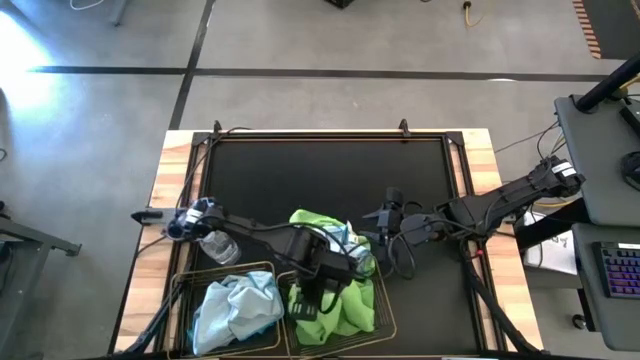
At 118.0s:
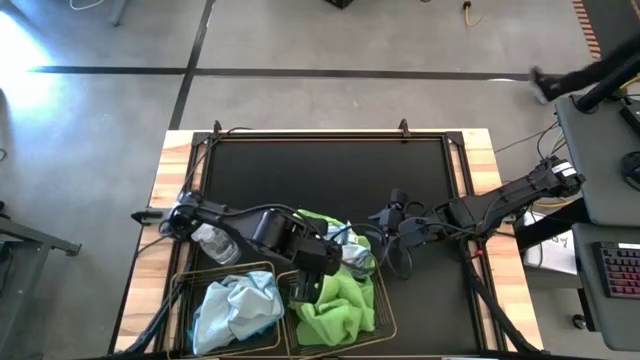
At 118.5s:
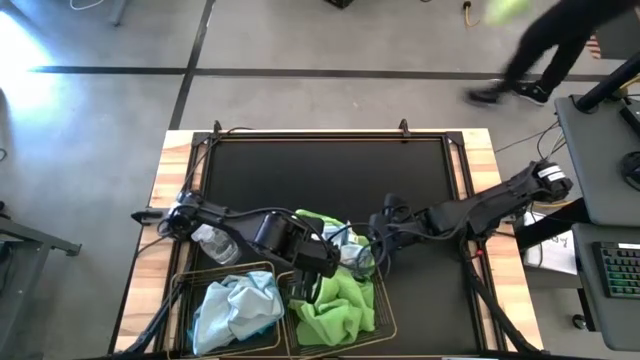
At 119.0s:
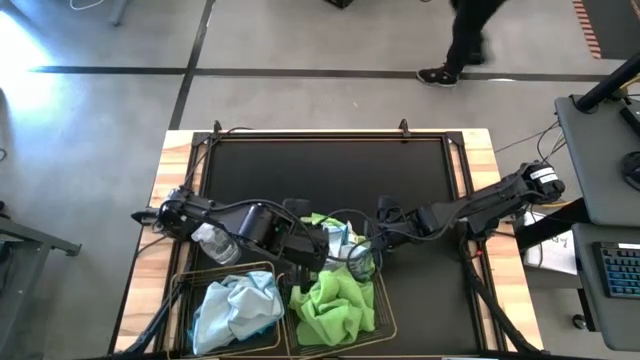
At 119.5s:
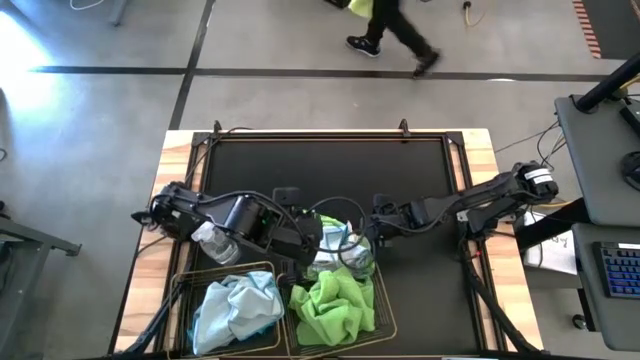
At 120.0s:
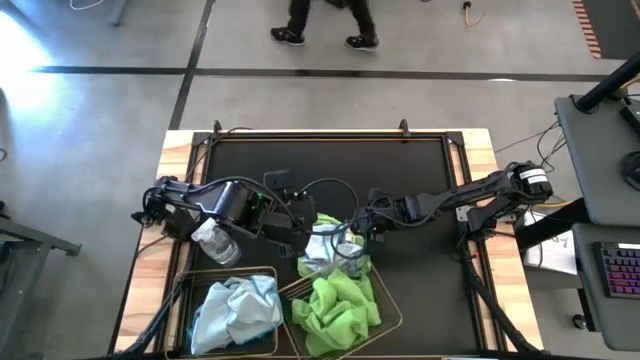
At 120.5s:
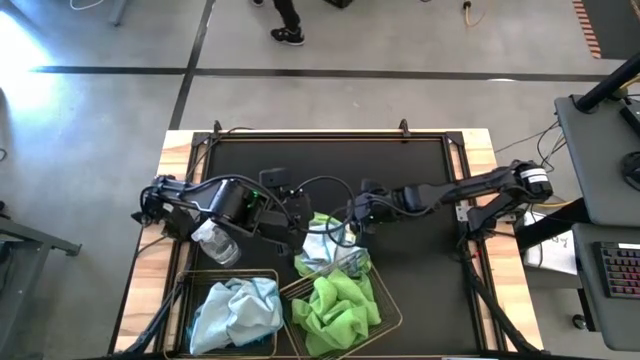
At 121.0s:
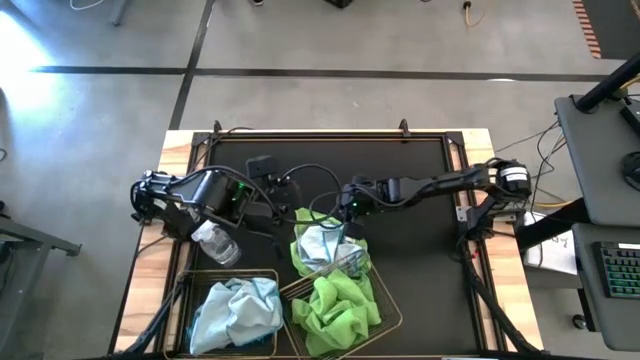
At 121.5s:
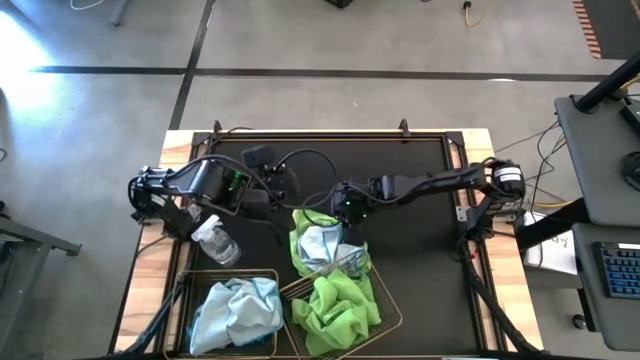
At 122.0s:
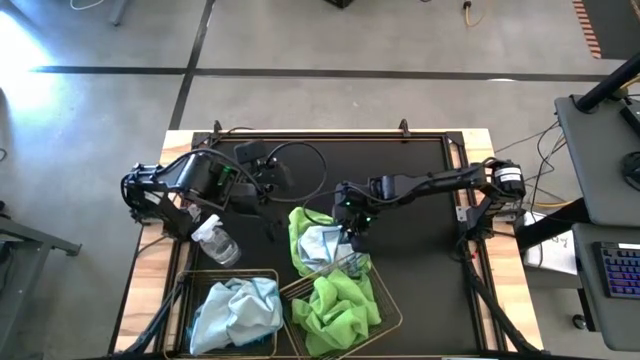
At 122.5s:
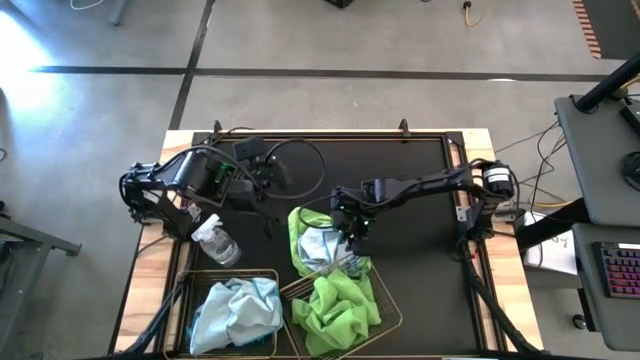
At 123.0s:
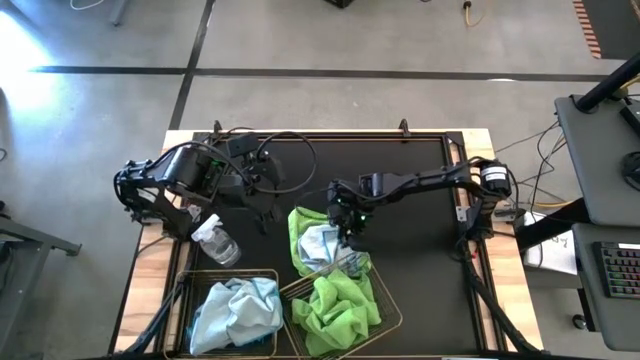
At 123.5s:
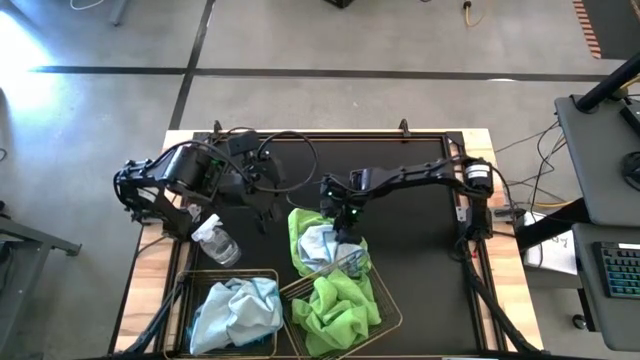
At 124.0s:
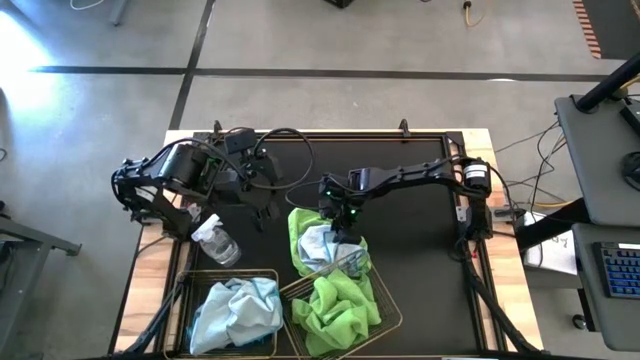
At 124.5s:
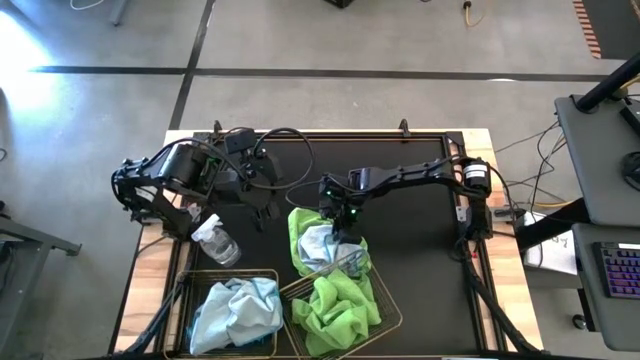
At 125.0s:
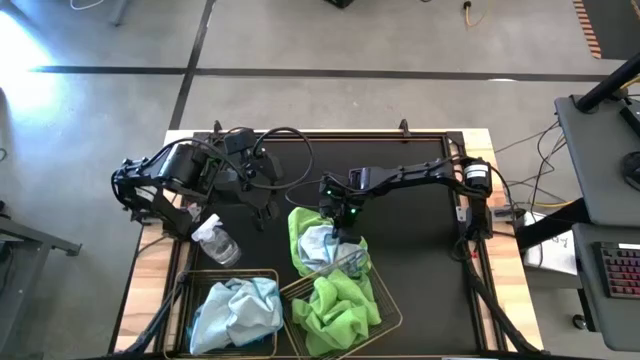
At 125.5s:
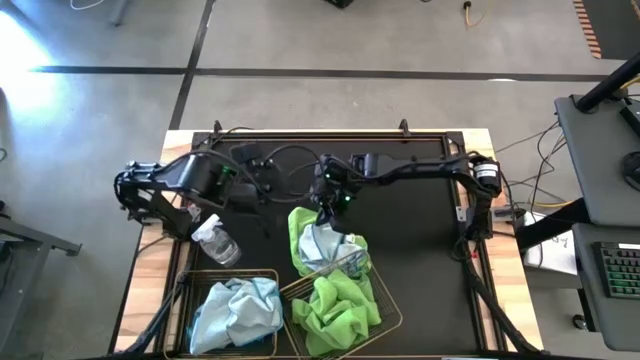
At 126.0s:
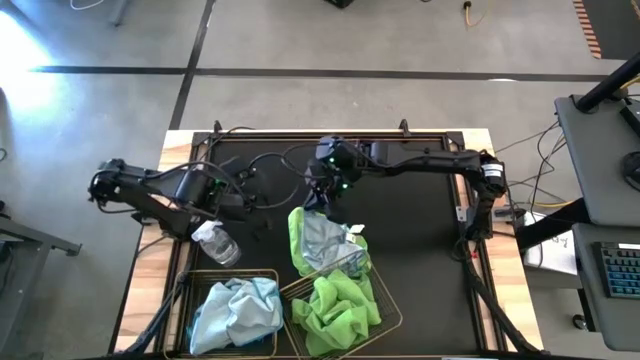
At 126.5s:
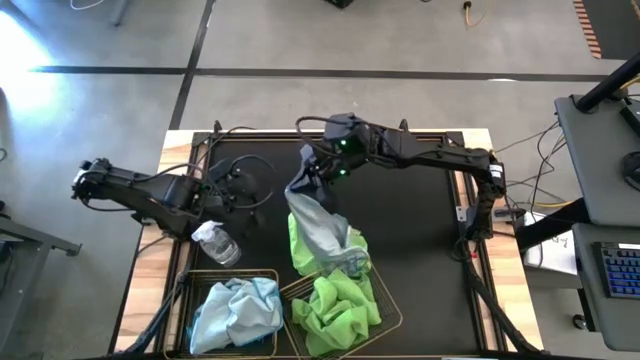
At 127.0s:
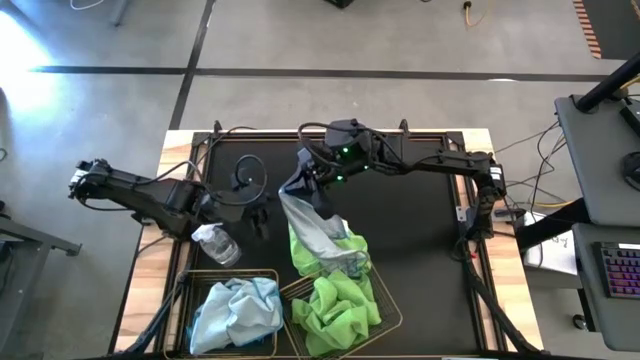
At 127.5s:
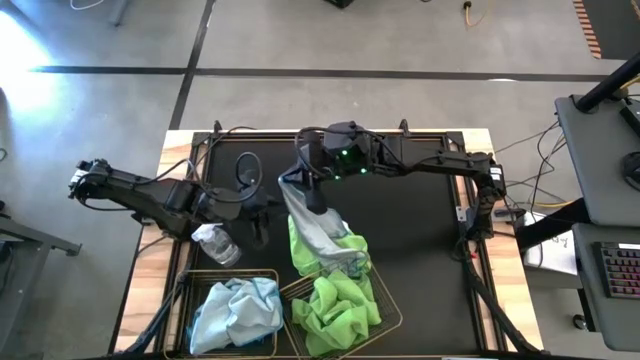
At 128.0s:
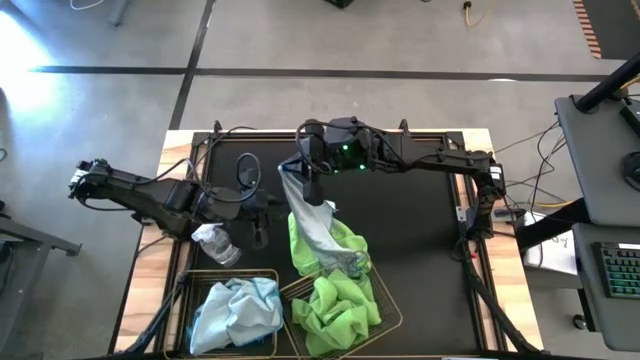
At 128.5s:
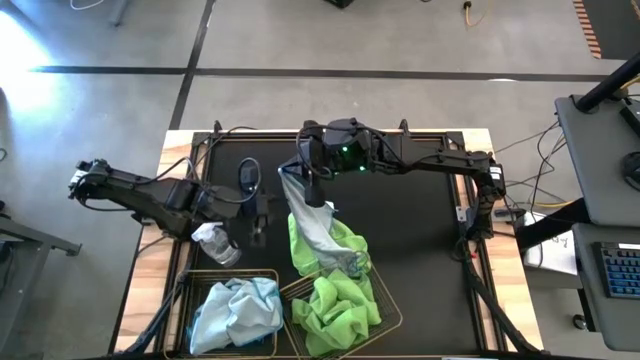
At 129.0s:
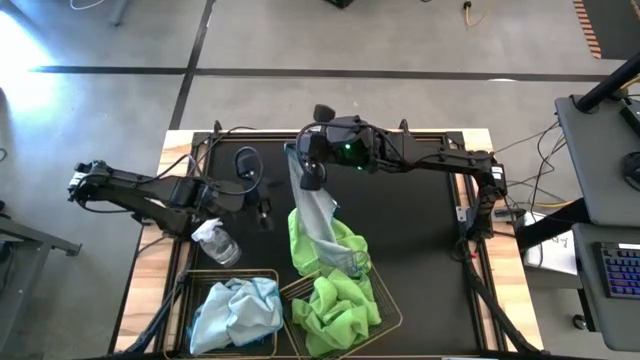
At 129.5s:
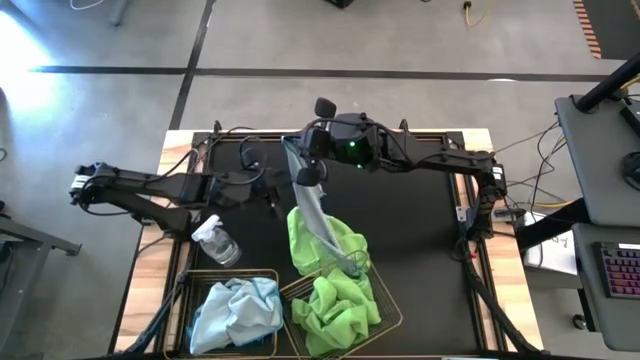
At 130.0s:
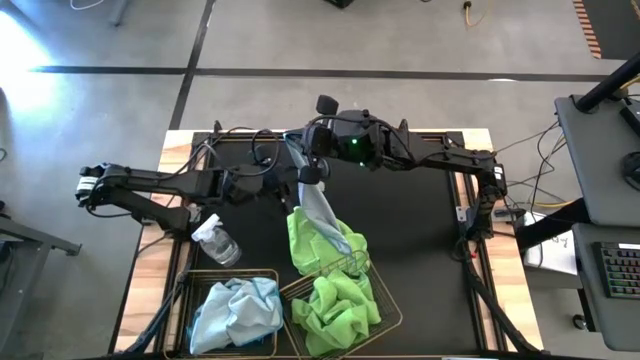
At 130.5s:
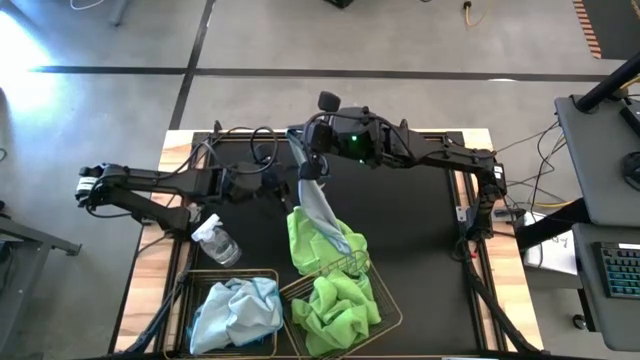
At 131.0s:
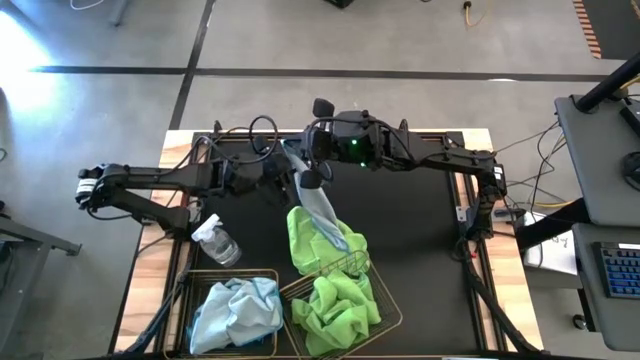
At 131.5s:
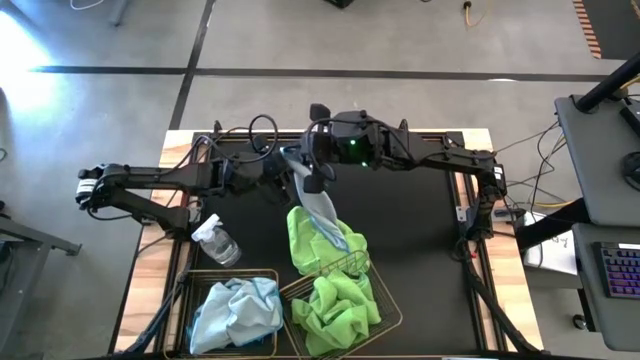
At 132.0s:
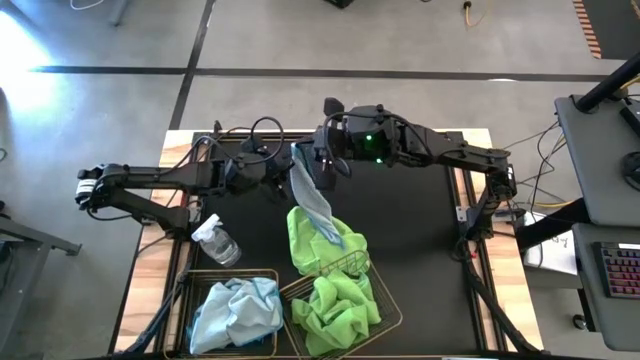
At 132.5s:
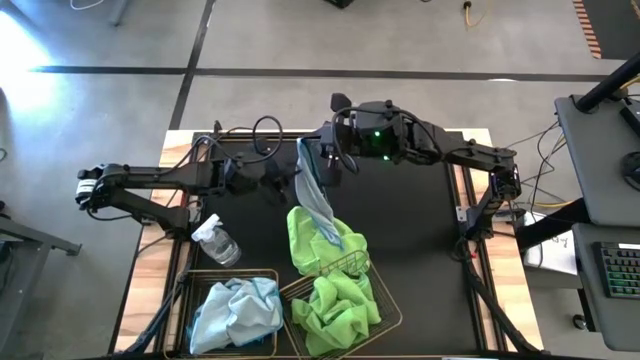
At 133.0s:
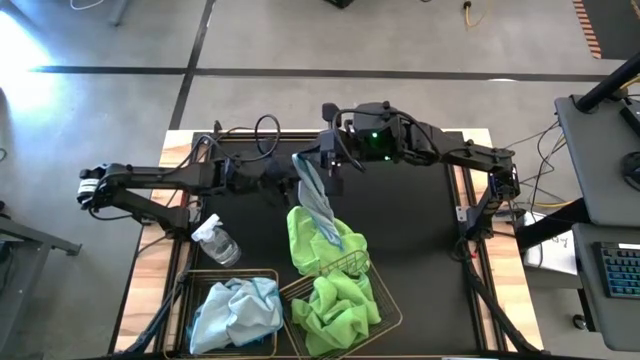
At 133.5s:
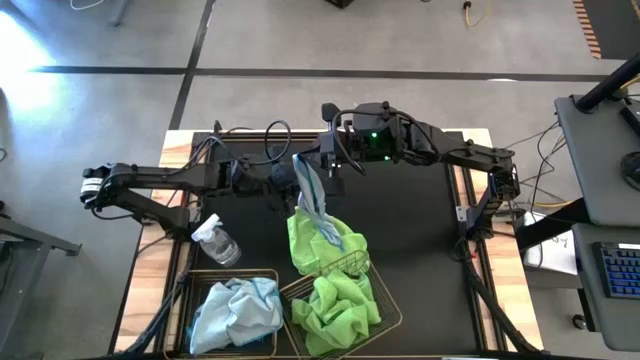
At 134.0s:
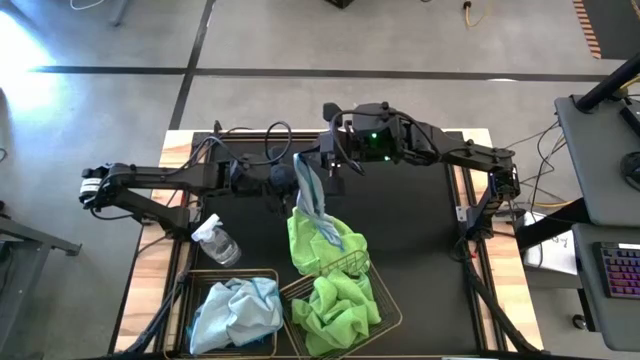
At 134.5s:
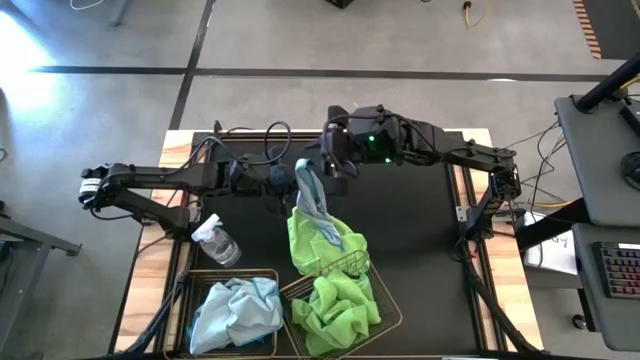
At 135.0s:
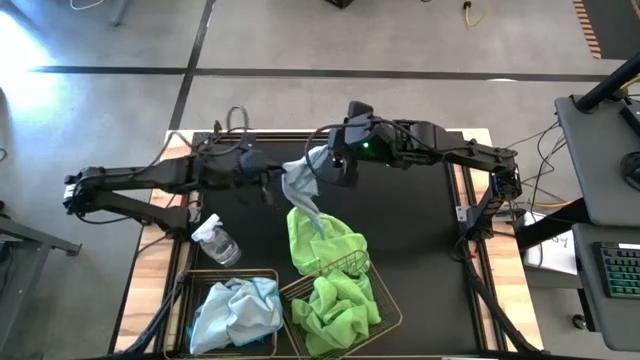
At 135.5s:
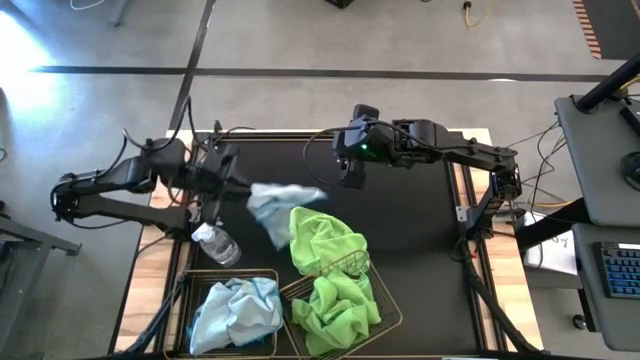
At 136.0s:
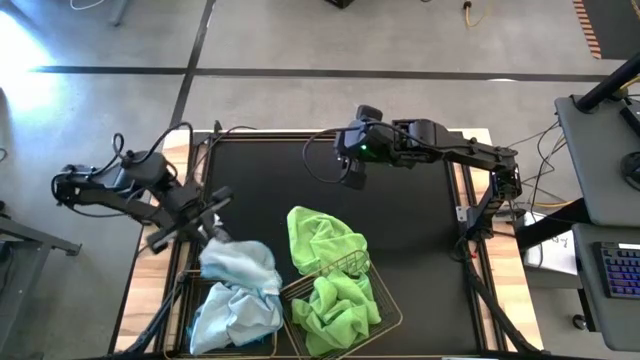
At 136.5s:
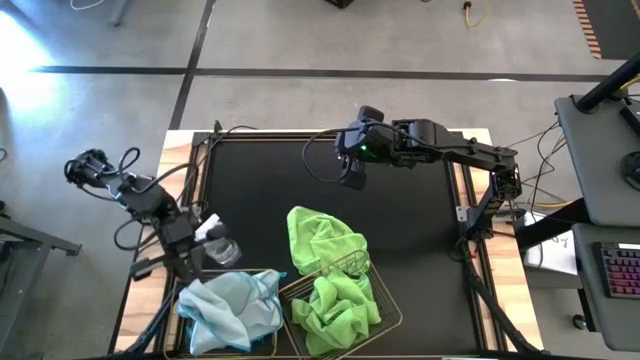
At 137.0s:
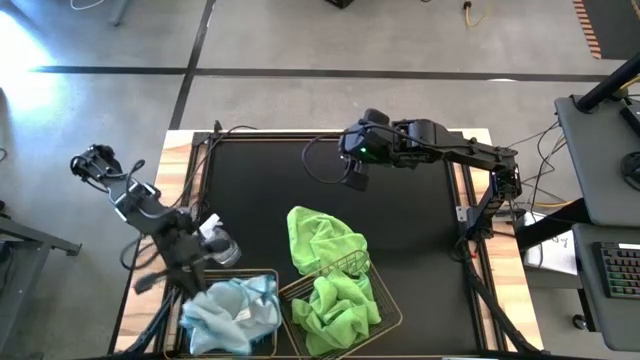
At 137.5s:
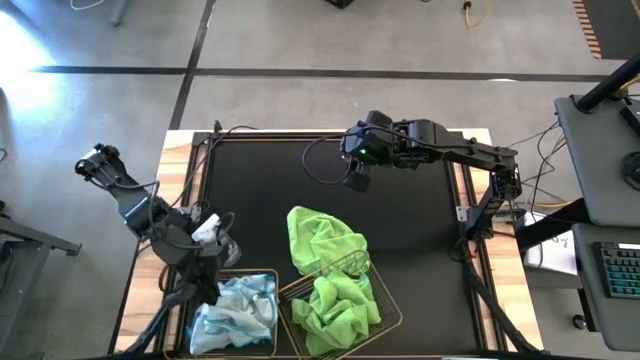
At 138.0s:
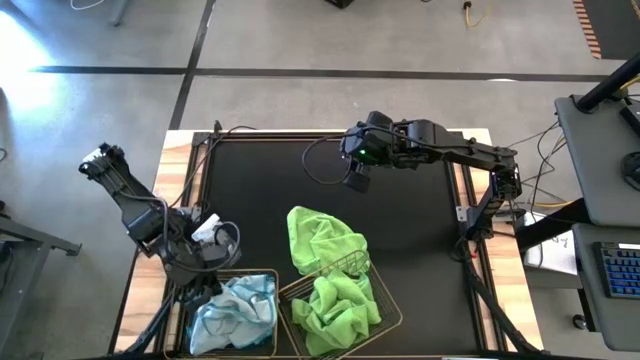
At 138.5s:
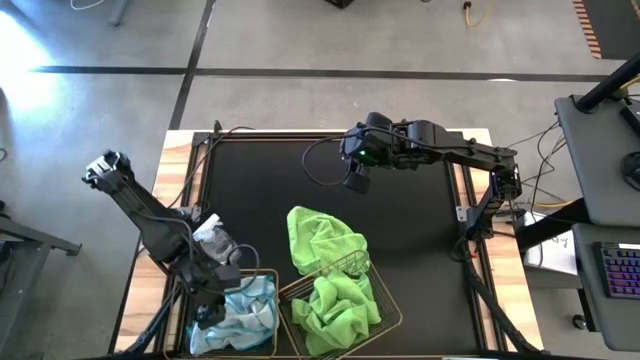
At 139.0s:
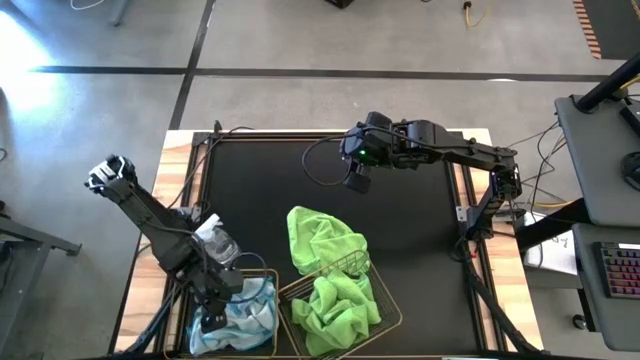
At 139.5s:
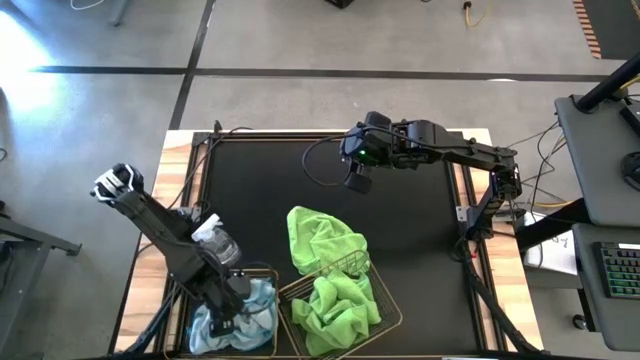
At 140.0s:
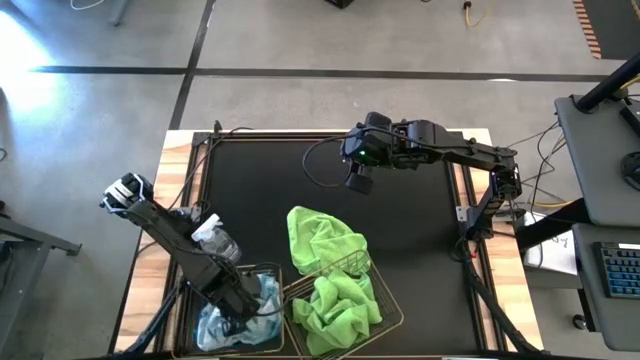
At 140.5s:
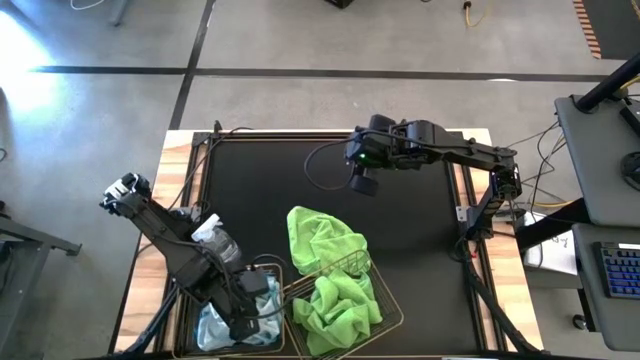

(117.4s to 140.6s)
Task: Sort microfiber towel by color & place in baskets
Put the blue towel into the left wire basket
